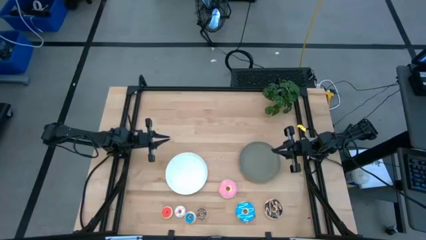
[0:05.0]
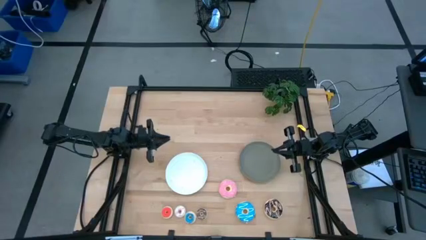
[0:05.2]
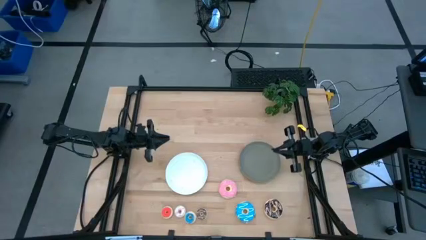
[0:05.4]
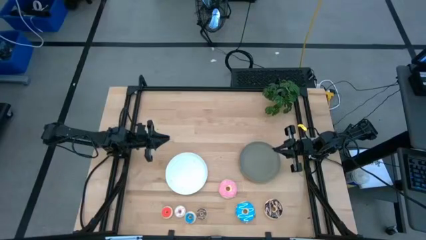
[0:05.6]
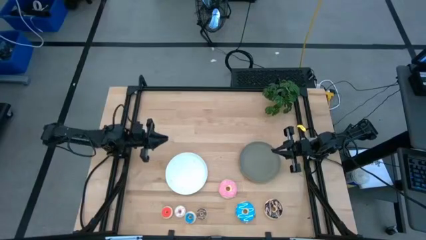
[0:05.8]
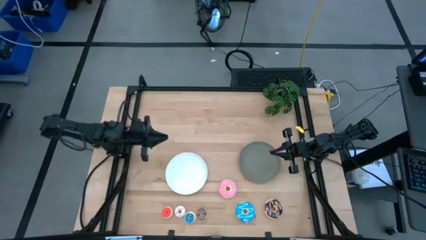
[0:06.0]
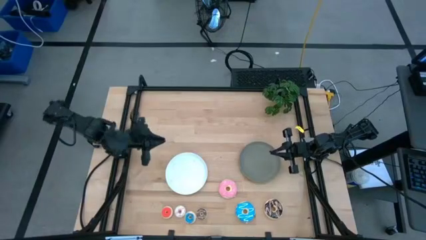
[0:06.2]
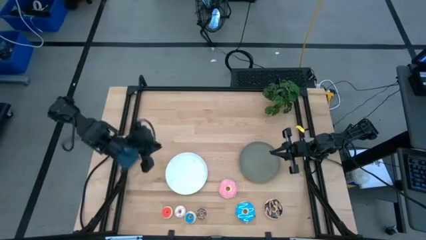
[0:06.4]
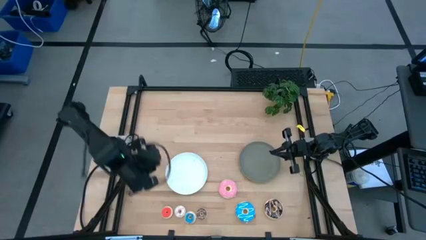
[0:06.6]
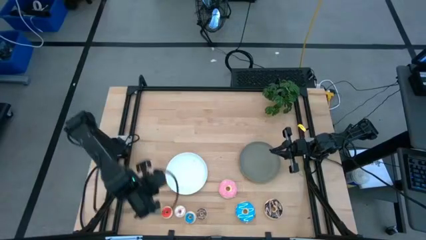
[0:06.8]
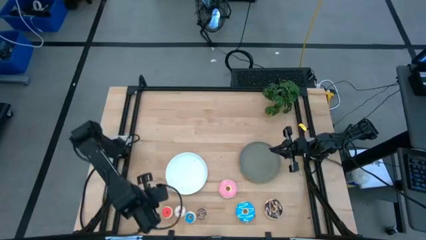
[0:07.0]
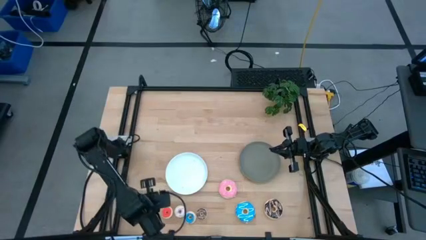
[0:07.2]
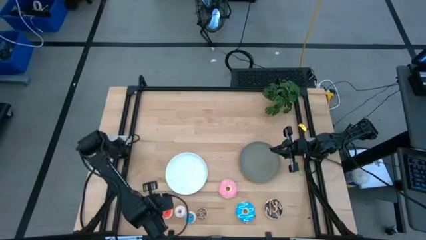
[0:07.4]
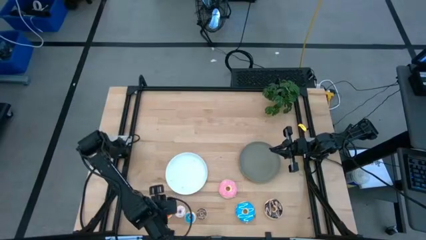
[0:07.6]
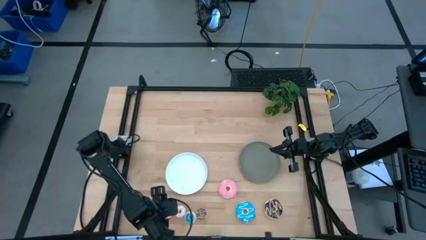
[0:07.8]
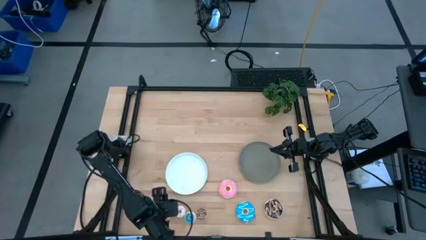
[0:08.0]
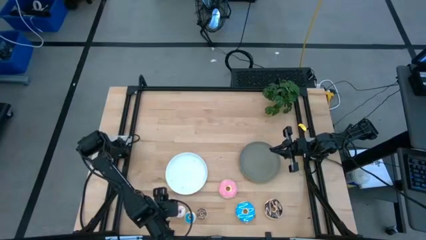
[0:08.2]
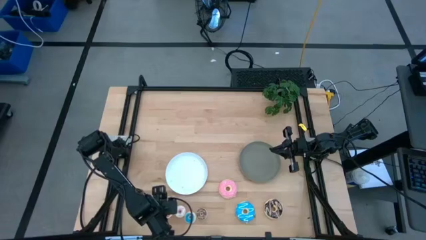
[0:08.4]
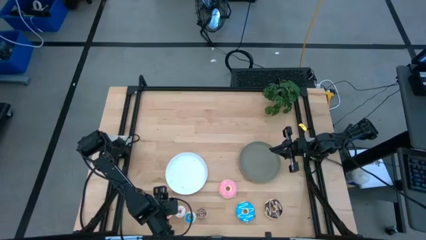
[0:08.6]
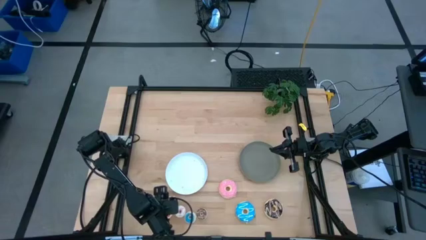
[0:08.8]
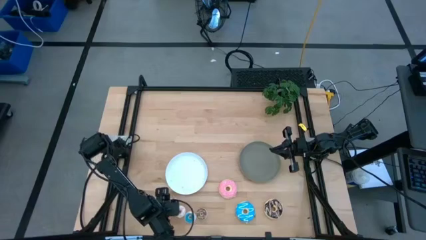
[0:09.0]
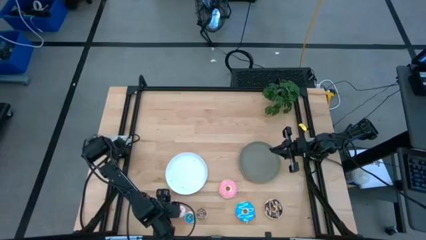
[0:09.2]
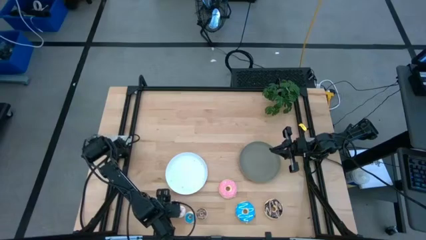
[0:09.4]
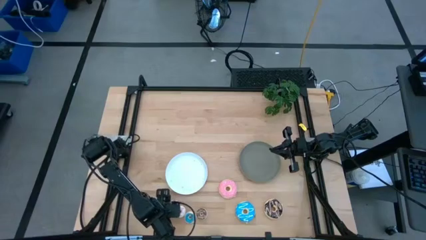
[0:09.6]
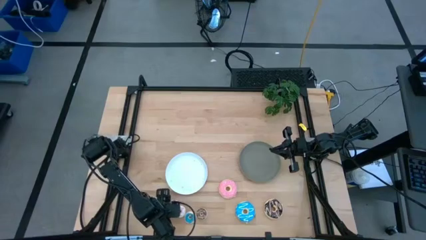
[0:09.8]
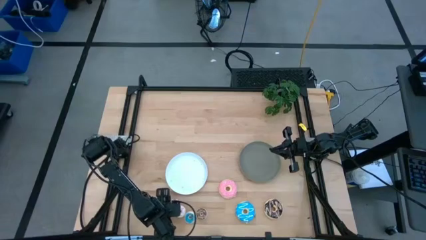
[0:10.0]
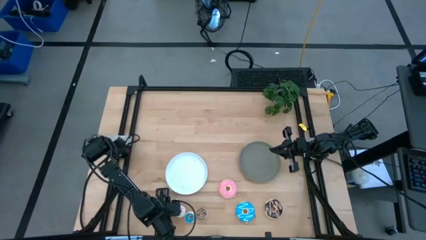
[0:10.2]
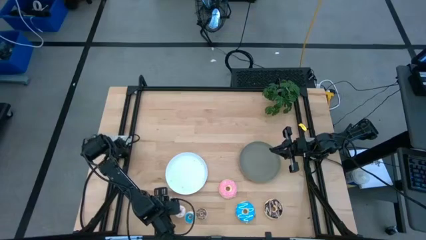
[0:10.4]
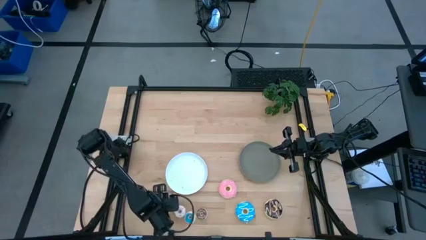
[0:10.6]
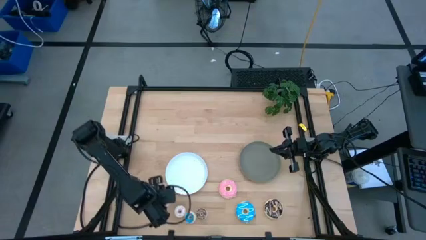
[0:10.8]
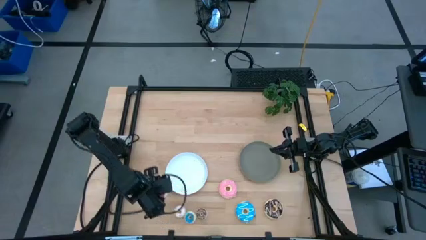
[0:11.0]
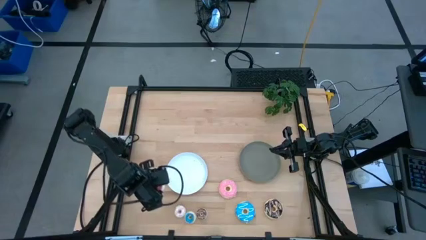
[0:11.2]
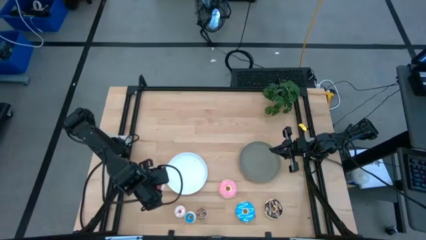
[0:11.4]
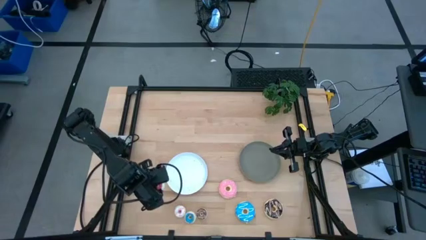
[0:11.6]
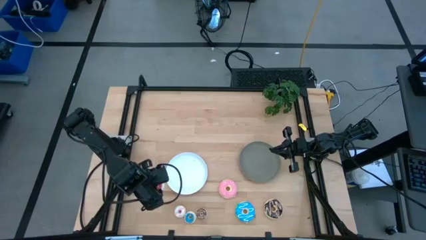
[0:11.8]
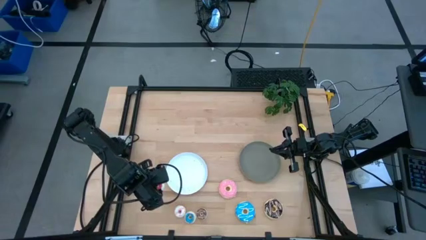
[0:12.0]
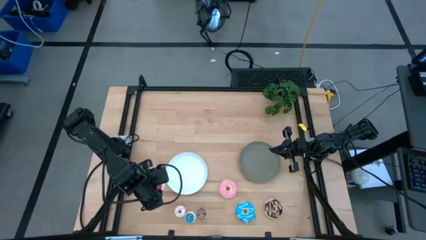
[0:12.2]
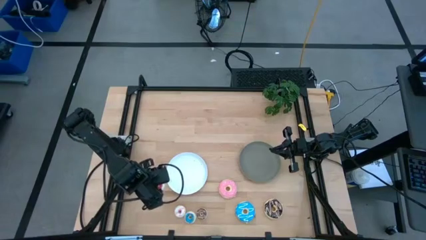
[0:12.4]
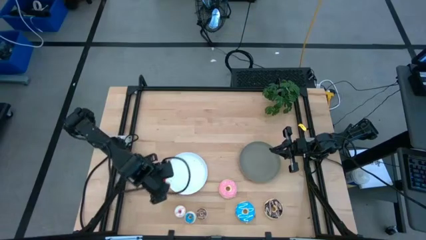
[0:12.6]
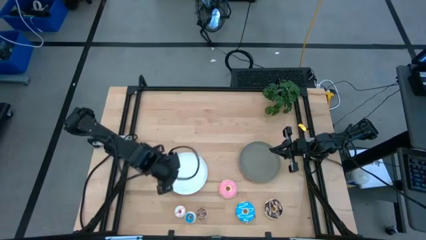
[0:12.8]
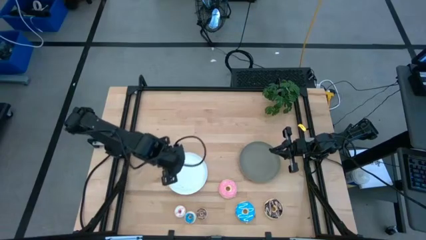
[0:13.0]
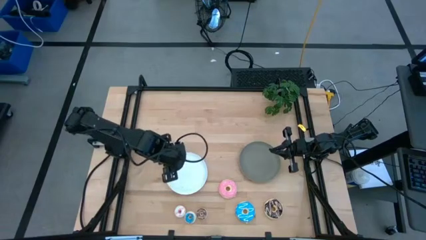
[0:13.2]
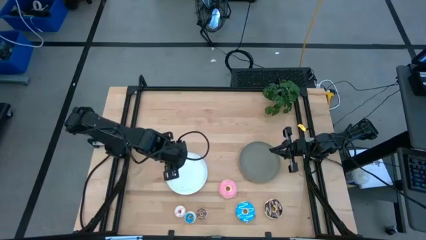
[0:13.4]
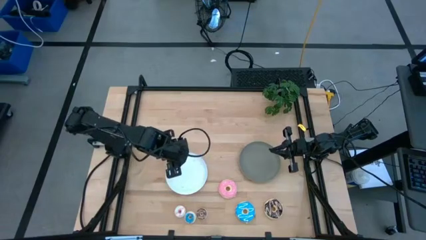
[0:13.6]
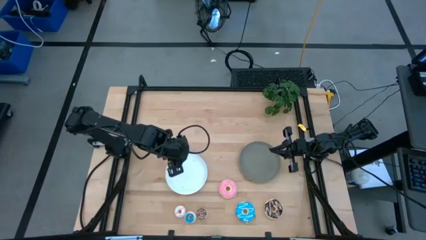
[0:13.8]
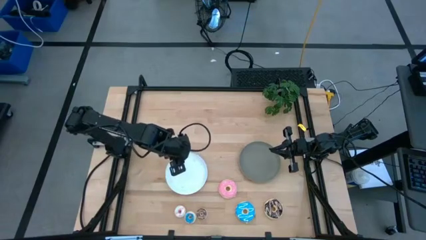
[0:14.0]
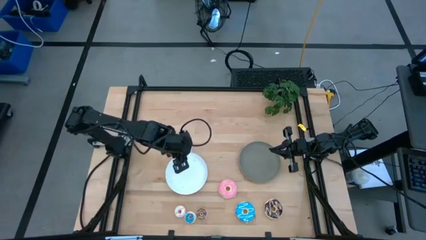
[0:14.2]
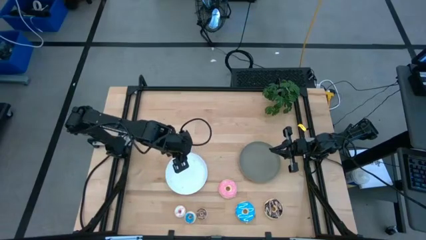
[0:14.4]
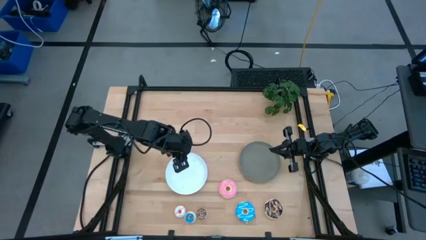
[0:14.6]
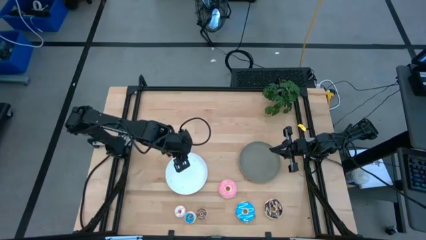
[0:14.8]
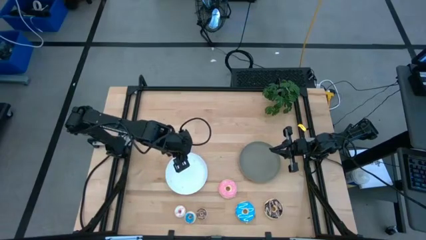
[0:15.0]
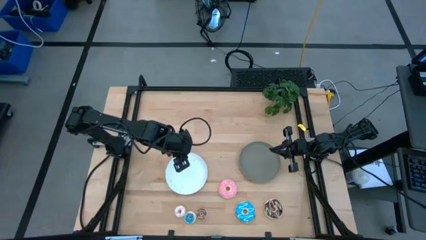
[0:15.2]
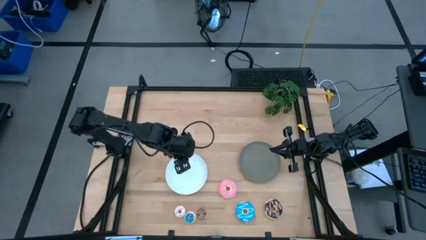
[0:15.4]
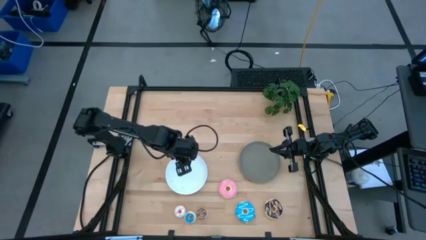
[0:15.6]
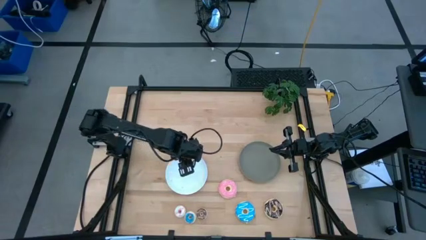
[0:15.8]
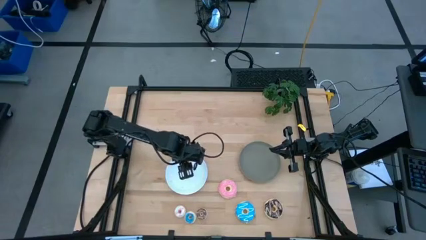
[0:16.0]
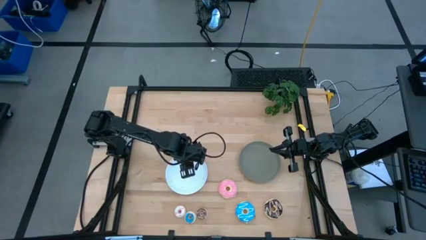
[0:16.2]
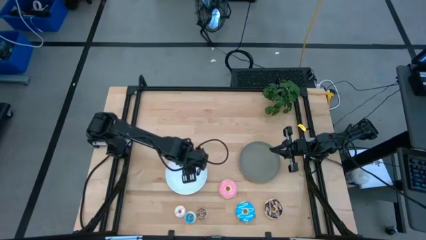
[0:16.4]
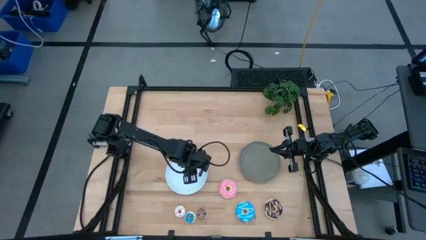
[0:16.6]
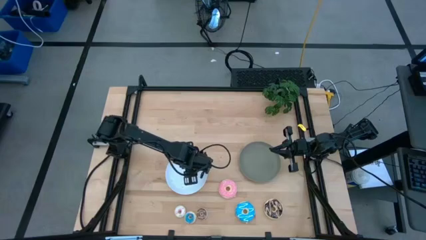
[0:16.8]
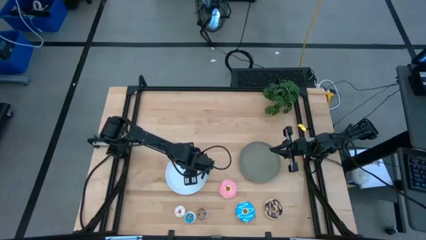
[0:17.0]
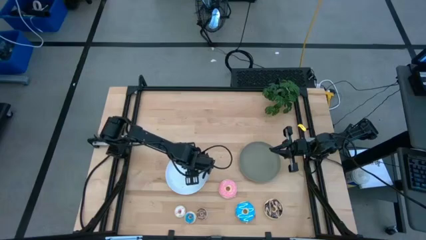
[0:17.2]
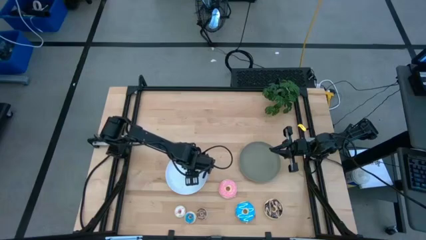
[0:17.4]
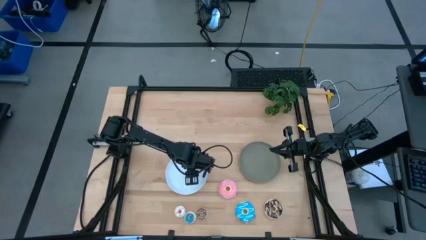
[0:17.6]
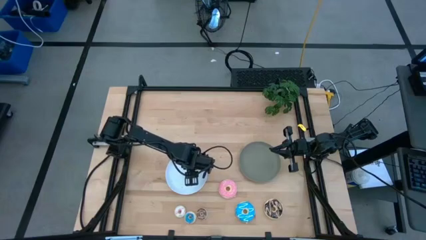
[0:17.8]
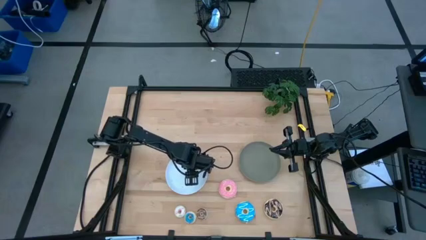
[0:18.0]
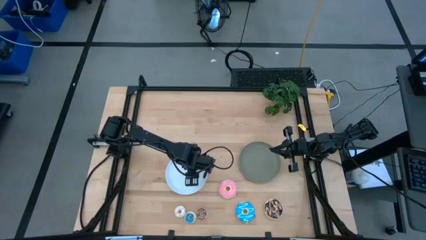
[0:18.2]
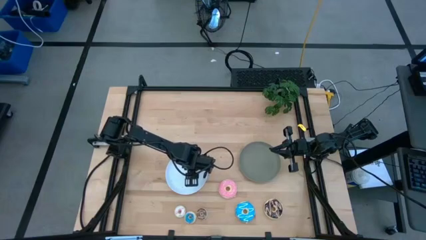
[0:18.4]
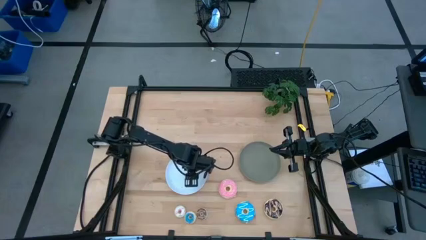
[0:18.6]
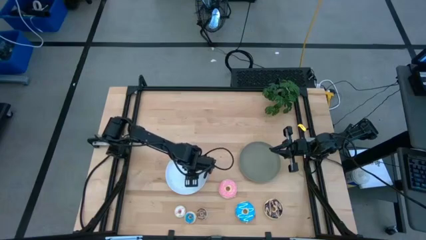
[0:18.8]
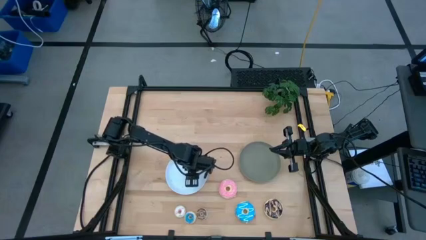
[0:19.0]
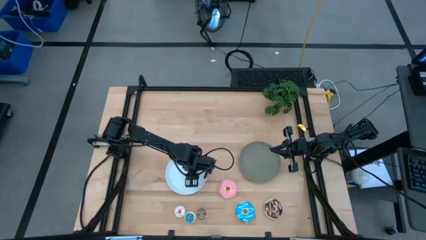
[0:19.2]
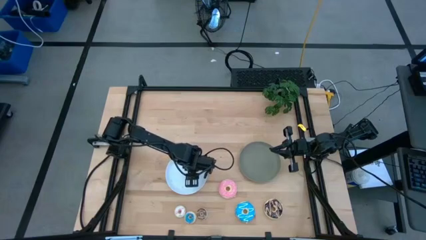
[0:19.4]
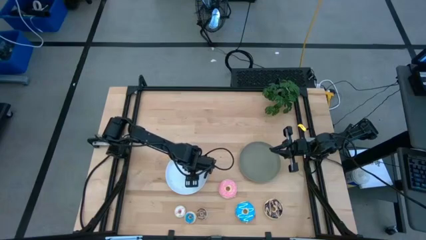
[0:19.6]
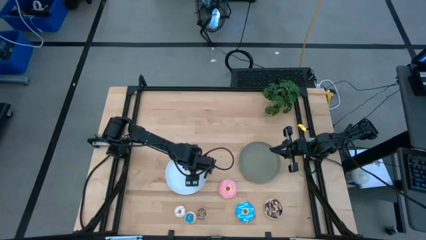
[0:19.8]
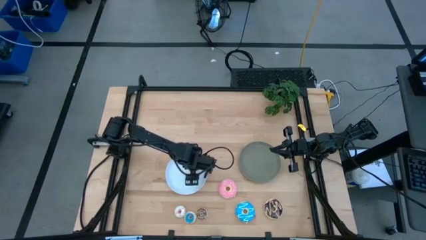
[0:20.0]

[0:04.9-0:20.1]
Task: Pick & Place donuts
Put the small orange donut on the white plate

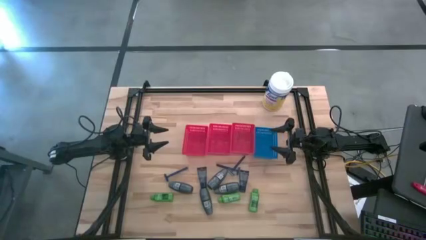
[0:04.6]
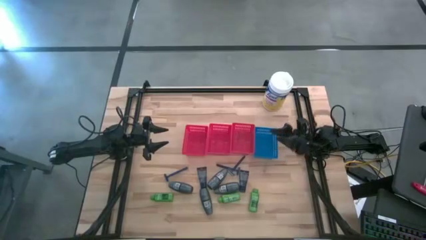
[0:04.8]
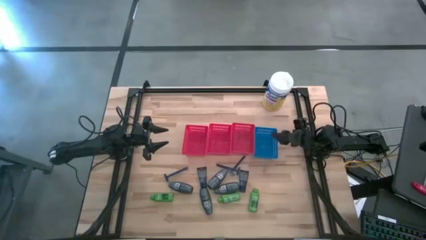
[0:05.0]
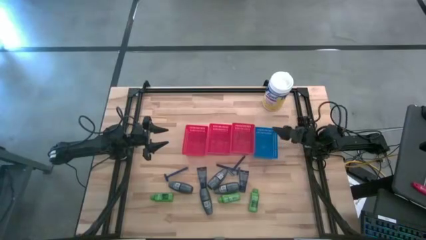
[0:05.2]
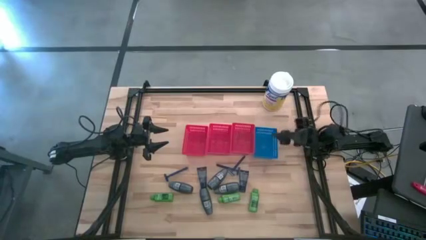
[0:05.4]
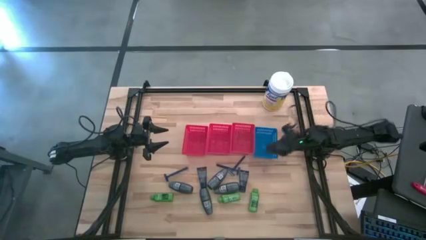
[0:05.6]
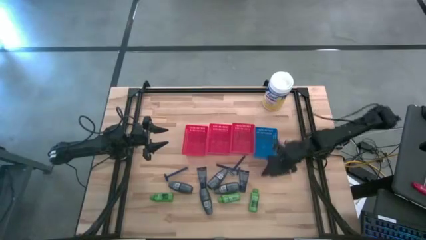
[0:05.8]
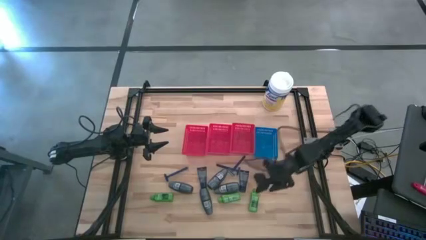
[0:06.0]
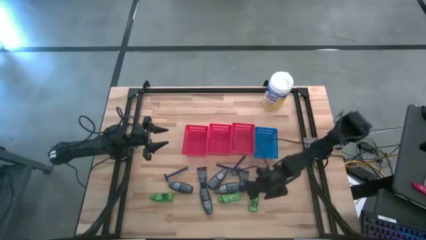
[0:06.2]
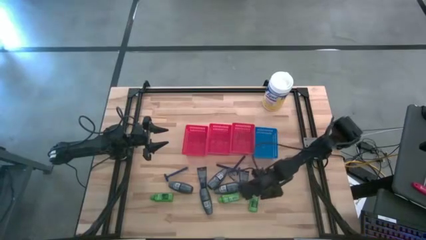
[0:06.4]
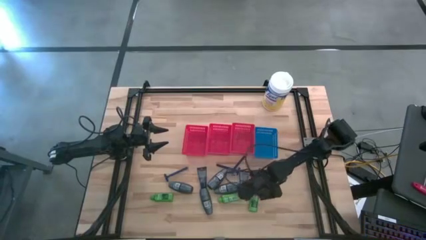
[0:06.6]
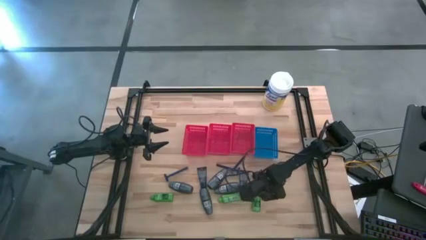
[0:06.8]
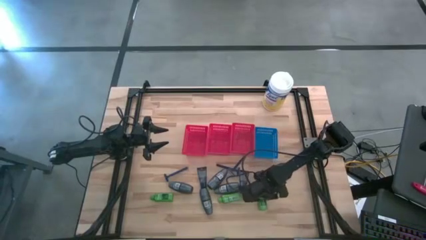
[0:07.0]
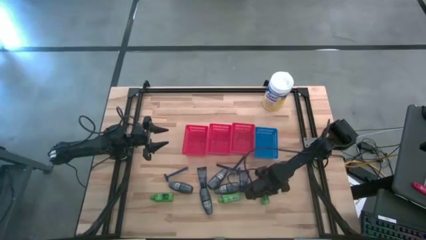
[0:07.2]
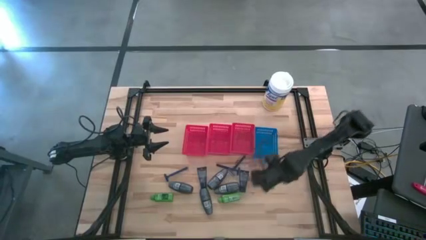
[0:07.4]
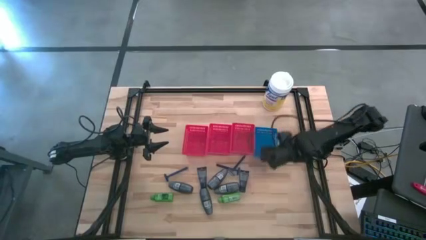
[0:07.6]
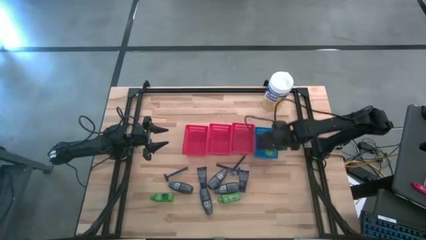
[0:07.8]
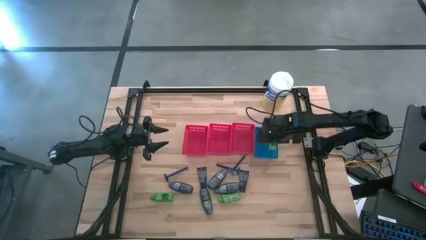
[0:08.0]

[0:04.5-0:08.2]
Task: Pick & Place Travel size toiletries
Put the shampoo into the blue bin
